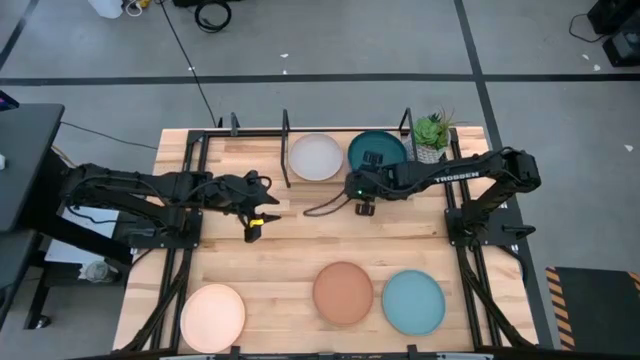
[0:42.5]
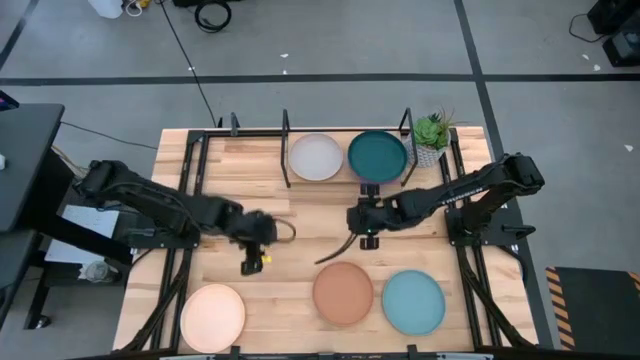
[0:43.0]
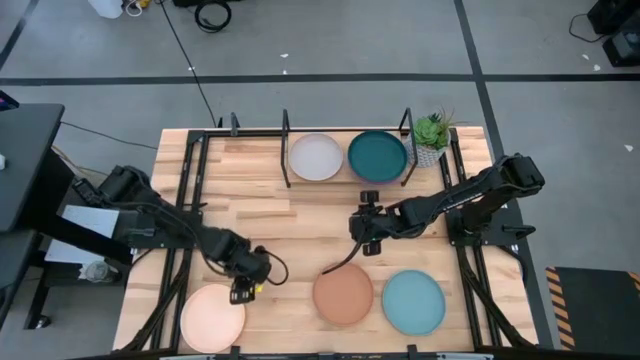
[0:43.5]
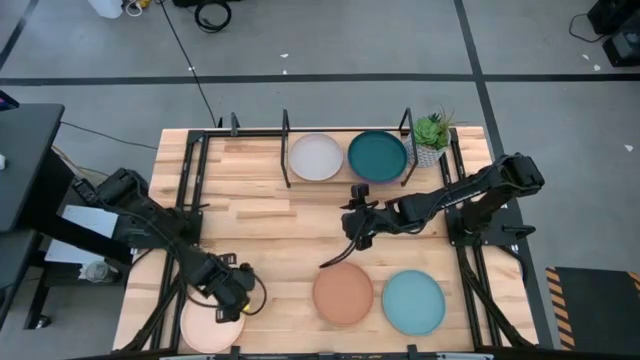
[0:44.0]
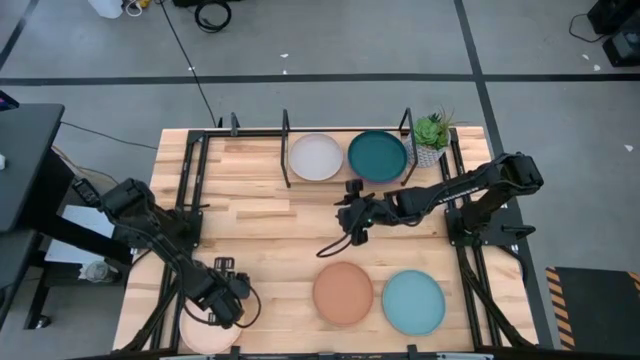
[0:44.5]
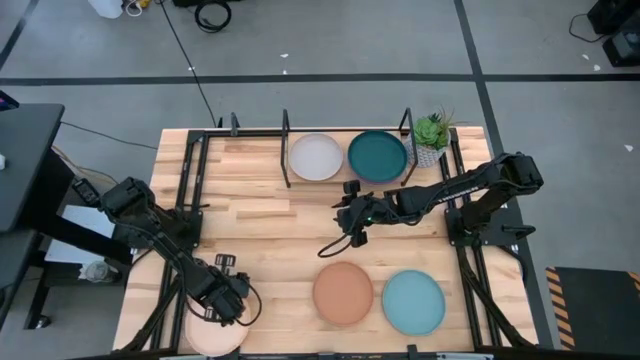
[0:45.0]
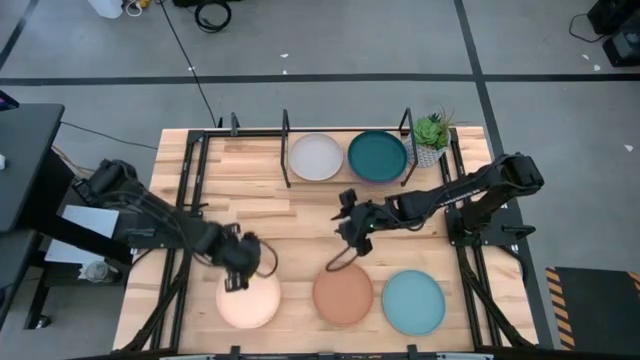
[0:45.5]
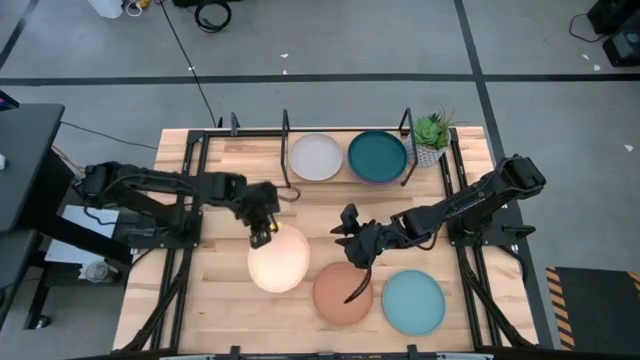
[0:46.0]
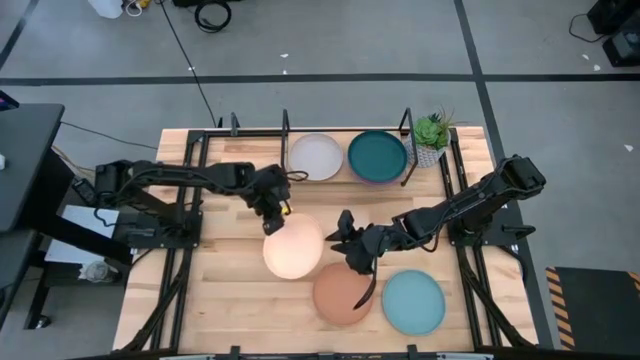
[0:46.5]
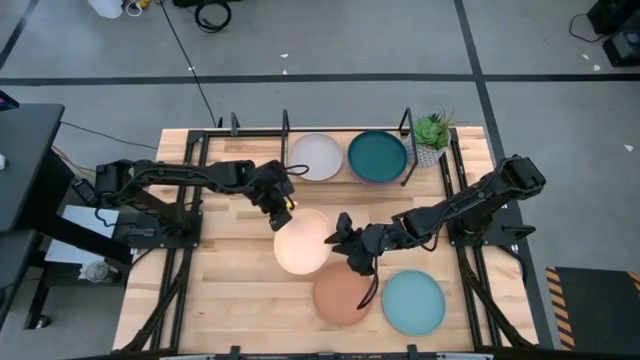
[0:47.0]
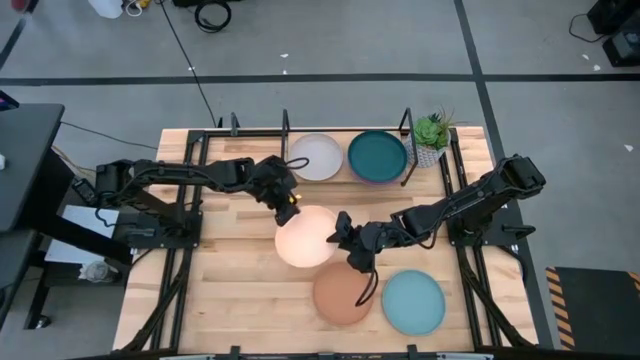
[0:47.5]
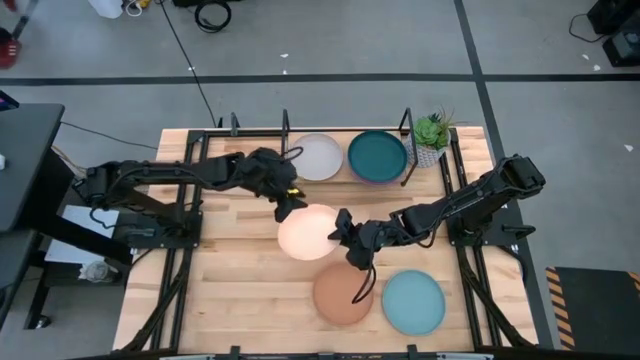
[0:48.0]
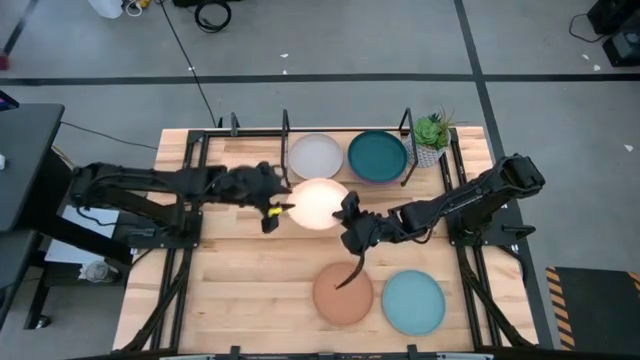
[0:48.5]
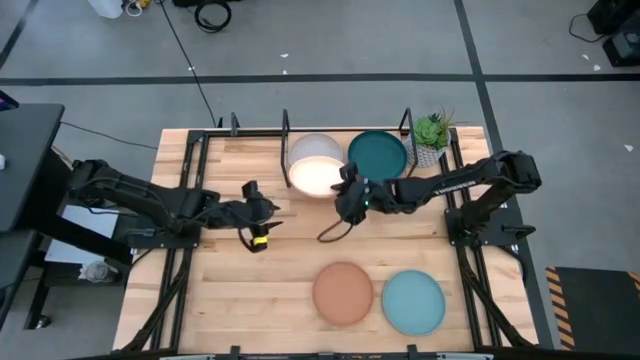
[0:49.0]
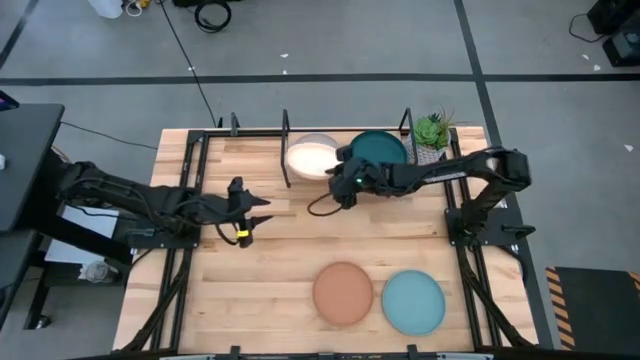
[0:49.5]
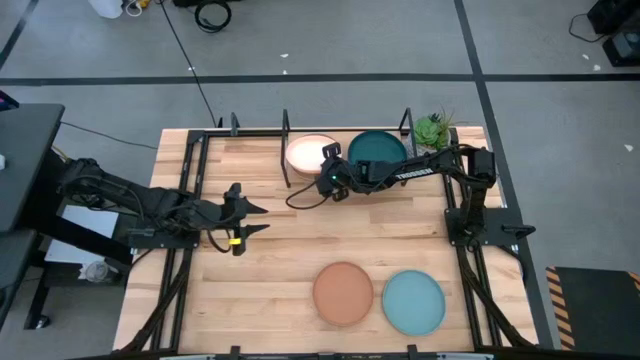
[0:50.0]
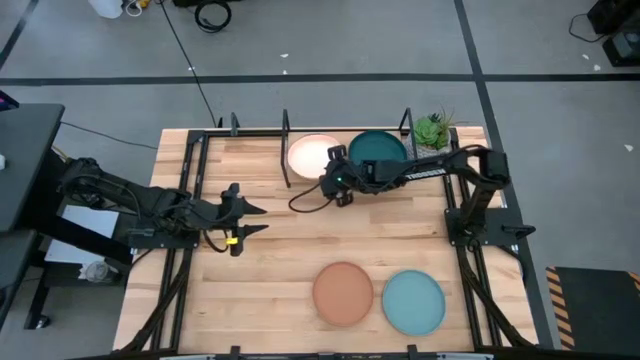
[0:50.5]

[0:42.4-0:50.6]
Task: Place and stack plates onto a shelf
Stack the light orange plate on top of the gray plate on the shelf

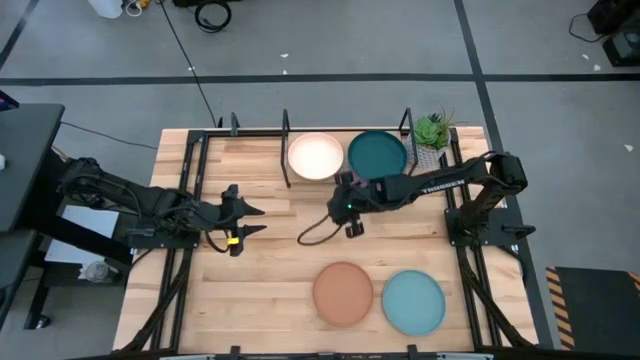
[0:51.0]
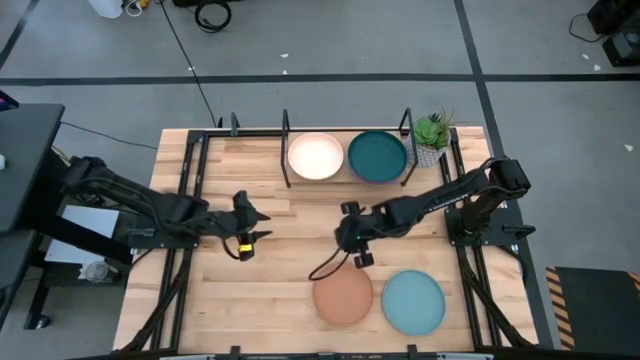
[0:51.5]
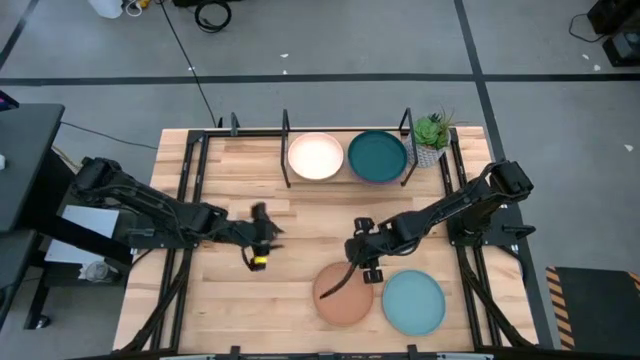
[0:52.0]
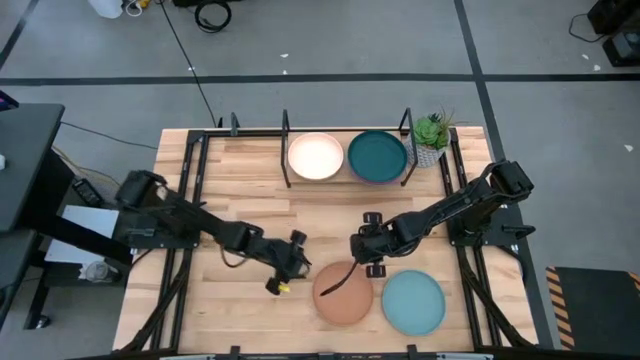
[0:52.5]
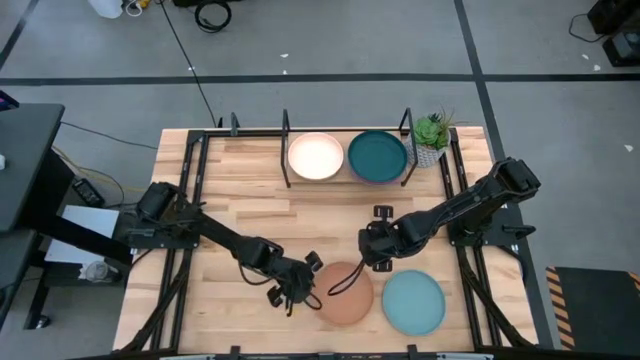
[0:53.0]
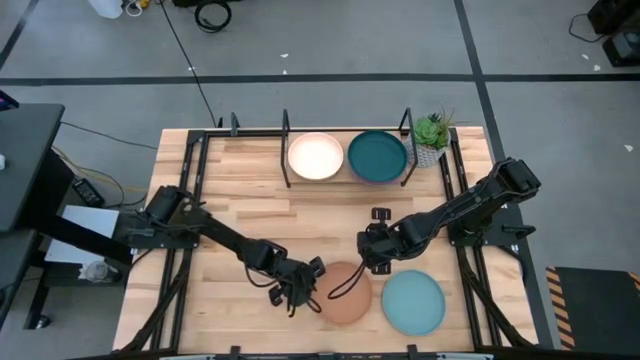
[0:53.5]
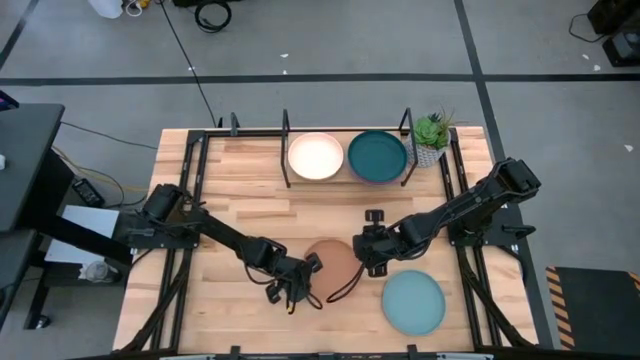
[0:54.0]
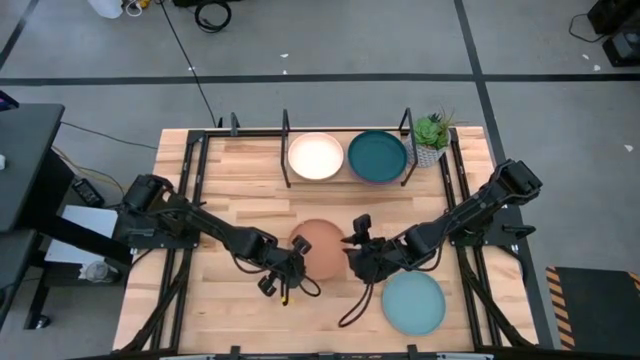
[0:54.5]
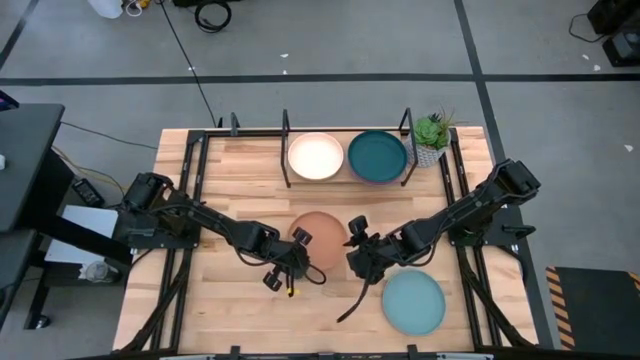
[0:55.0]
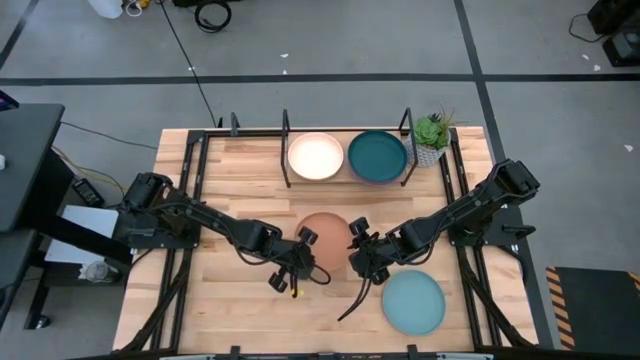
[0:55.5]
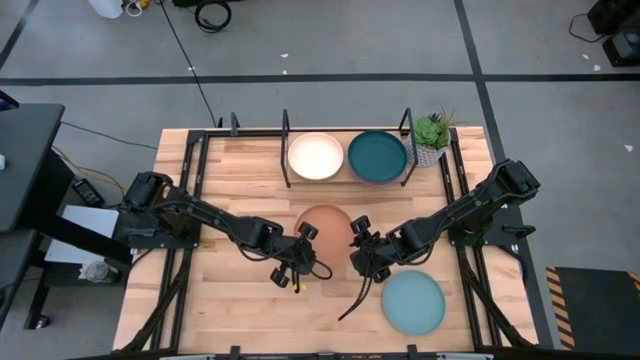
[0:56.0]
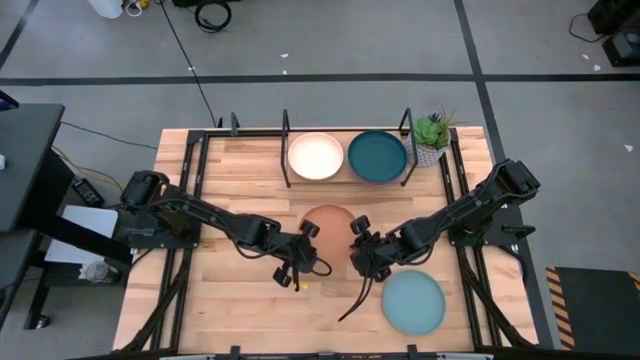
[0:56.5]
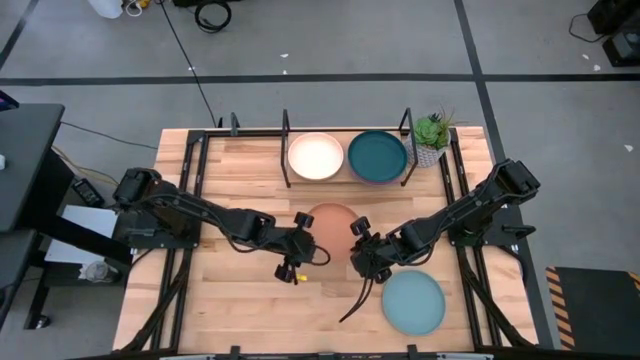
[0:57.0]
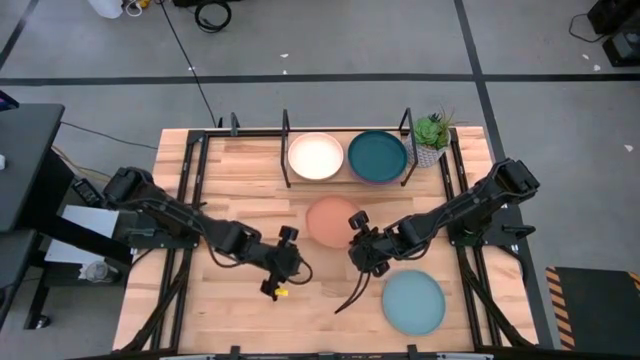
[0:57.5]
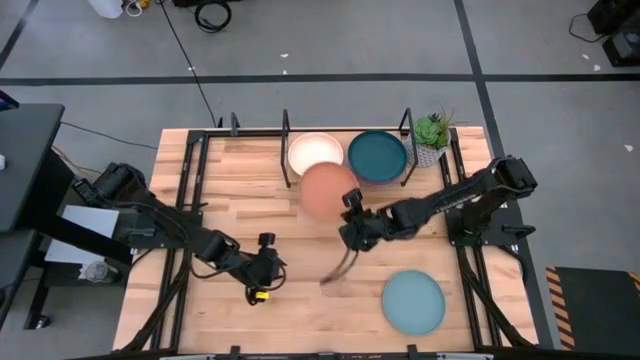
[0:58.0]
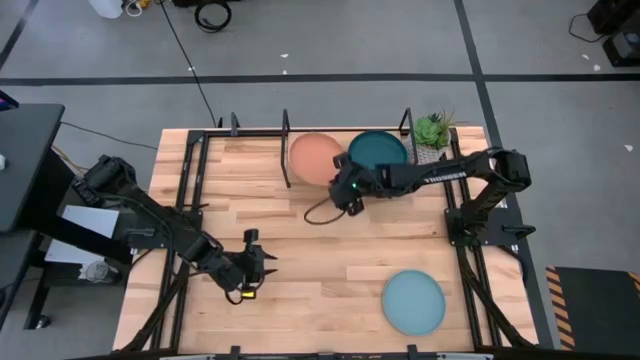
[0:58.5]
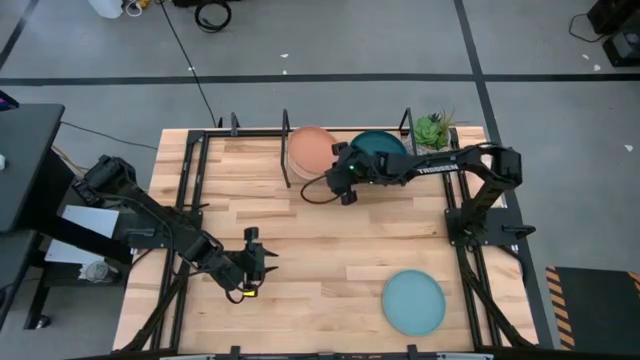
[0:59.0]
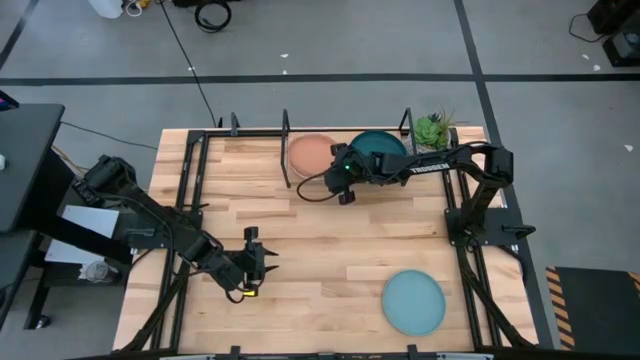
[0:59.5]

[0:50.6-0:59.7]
Stack the brown plate on top of the light orange plate on the shelf

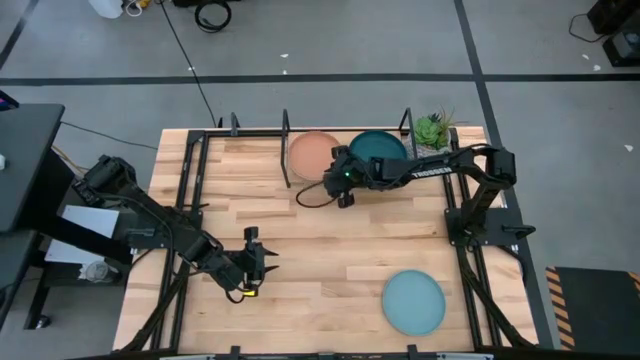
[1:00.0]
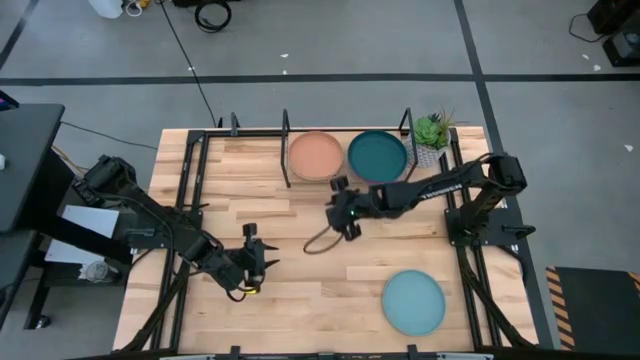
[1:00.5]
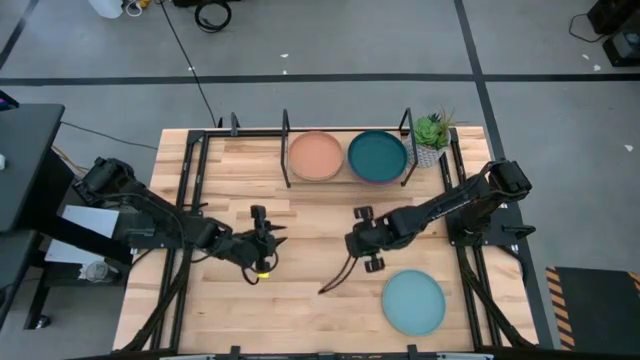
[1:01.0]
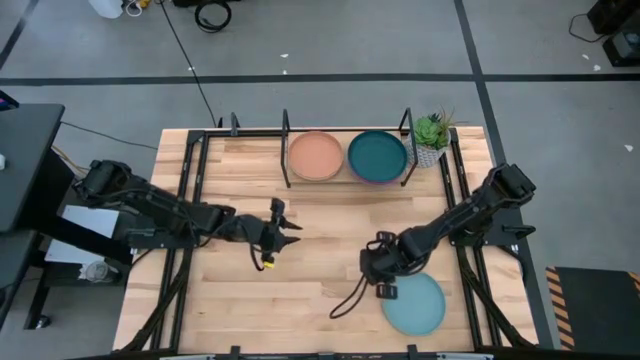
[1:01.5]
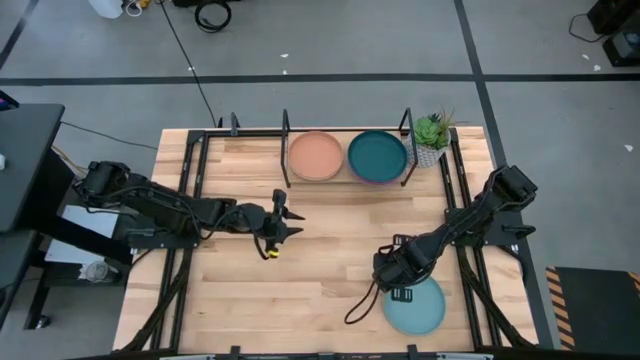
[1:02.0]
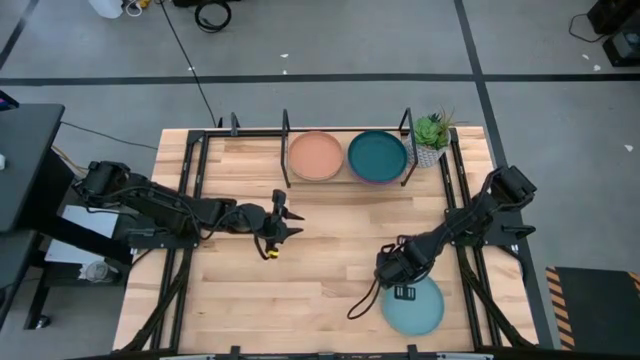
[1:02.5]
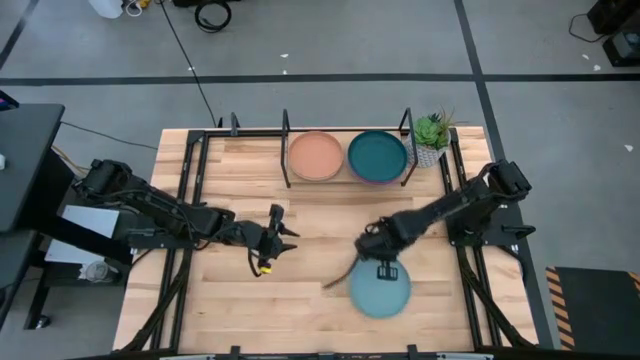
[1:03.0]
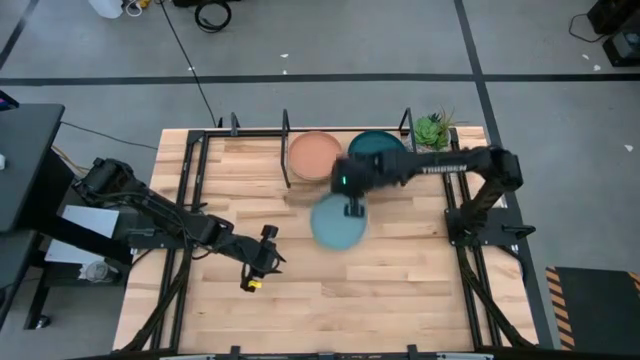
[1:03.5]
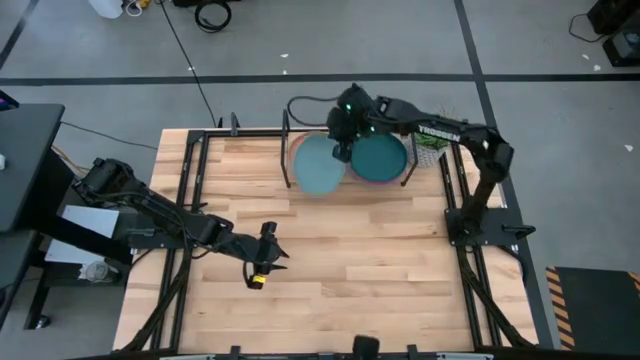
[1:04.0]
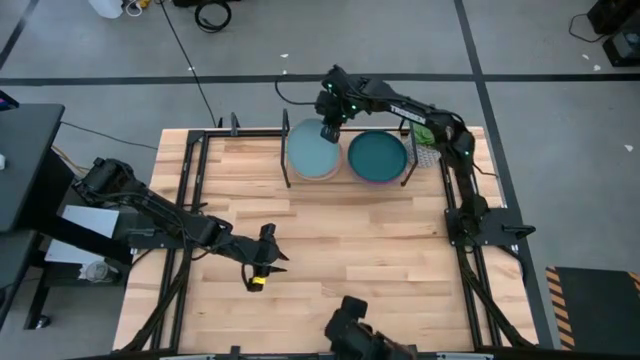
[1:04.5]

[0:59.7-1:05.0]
Stack the light blue plate on top of the brown plate on the shelf
